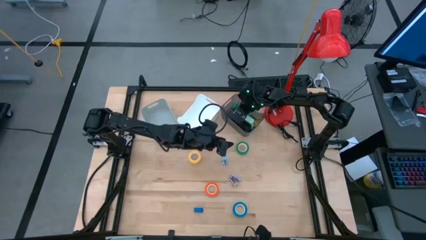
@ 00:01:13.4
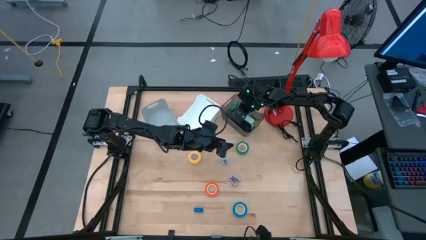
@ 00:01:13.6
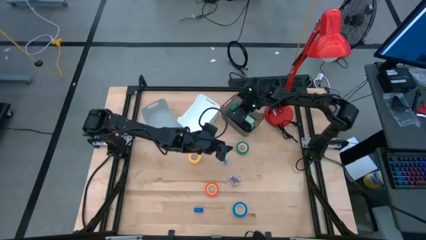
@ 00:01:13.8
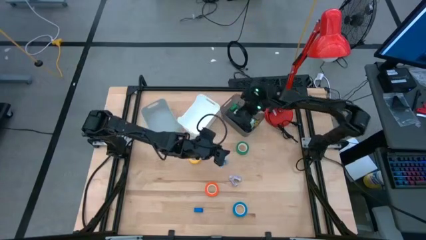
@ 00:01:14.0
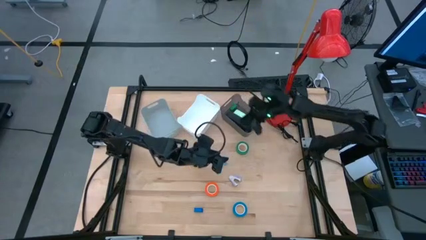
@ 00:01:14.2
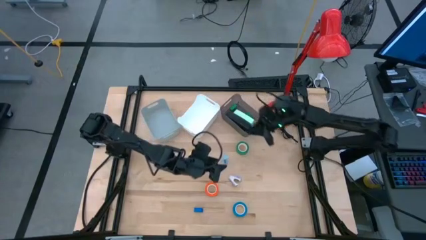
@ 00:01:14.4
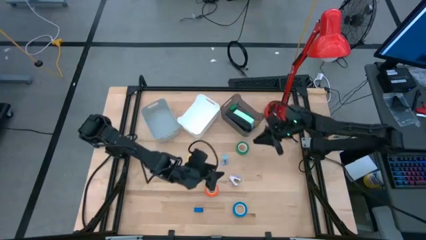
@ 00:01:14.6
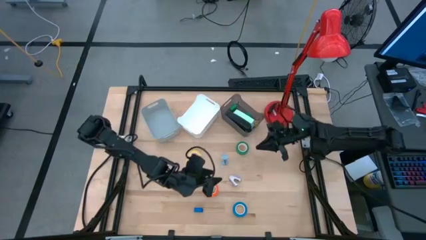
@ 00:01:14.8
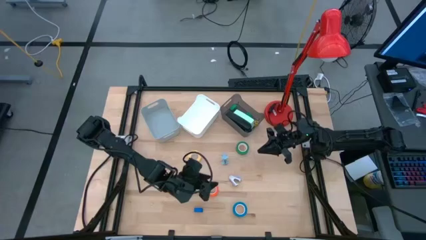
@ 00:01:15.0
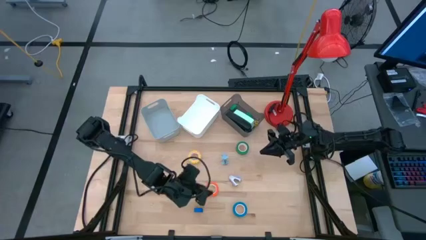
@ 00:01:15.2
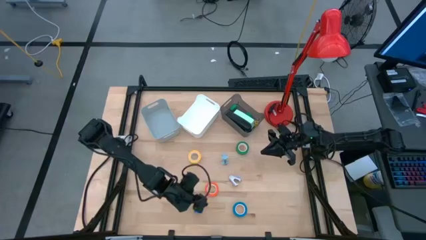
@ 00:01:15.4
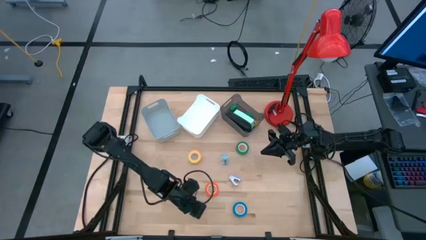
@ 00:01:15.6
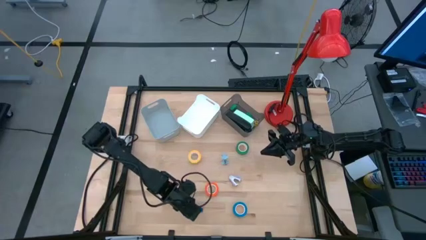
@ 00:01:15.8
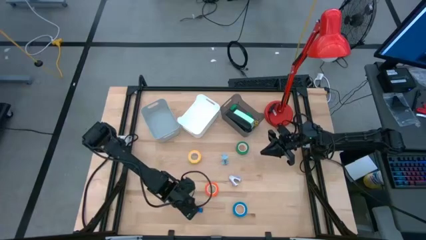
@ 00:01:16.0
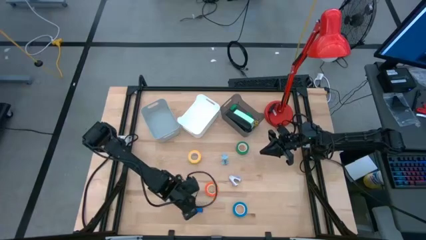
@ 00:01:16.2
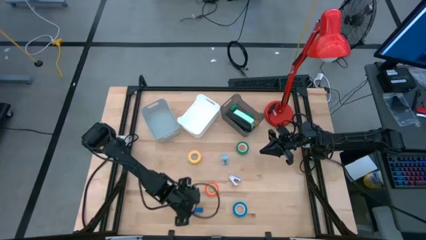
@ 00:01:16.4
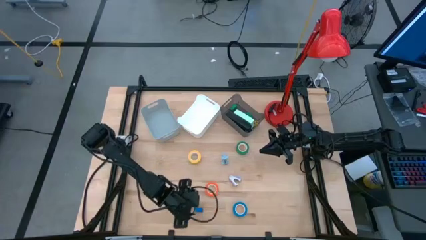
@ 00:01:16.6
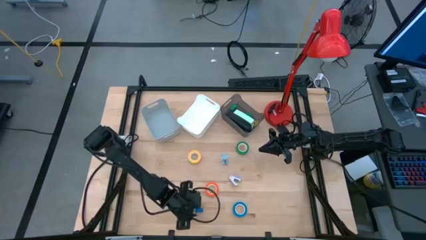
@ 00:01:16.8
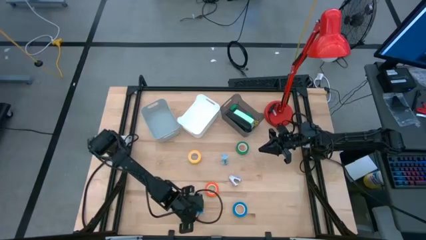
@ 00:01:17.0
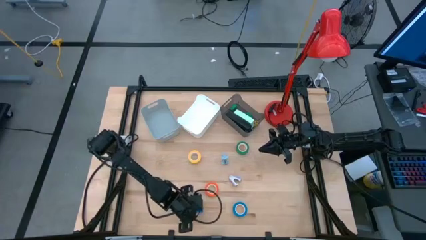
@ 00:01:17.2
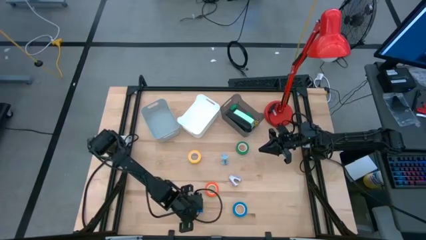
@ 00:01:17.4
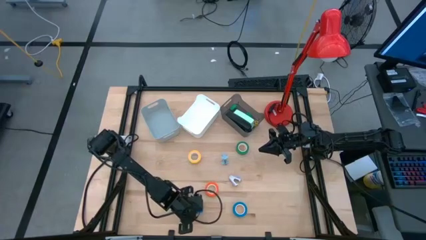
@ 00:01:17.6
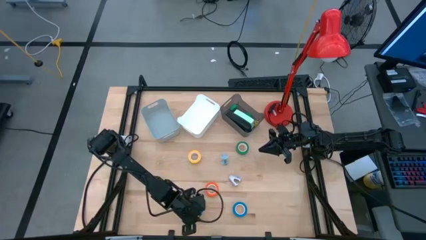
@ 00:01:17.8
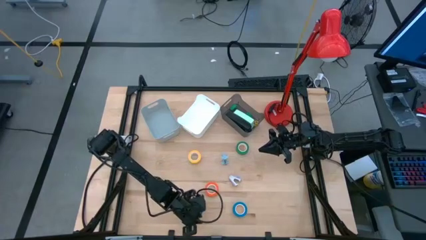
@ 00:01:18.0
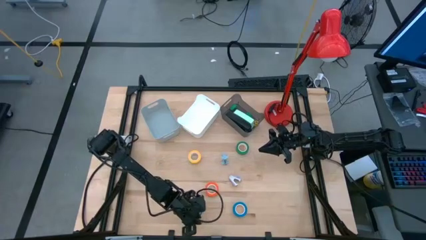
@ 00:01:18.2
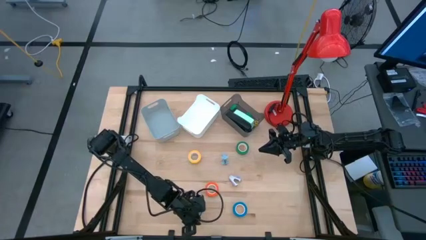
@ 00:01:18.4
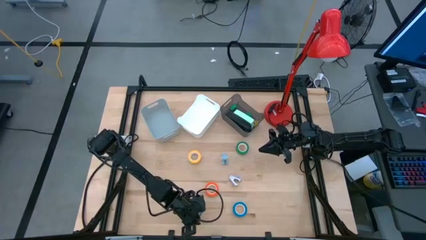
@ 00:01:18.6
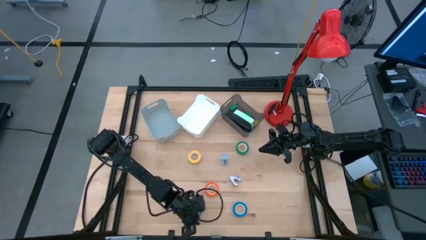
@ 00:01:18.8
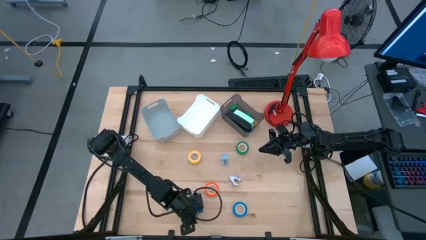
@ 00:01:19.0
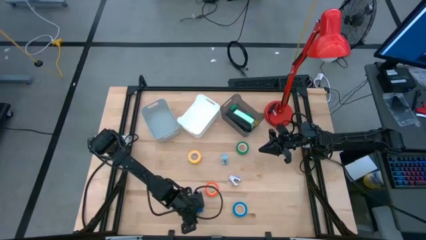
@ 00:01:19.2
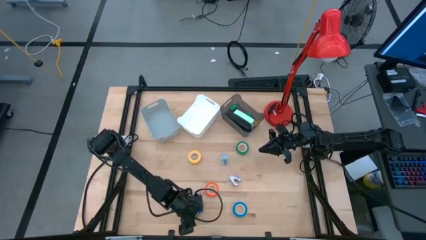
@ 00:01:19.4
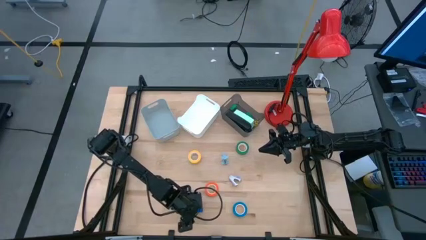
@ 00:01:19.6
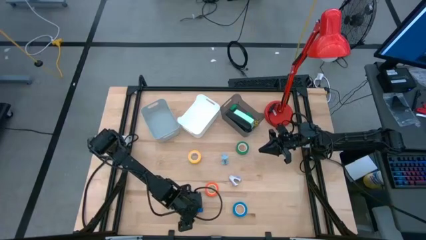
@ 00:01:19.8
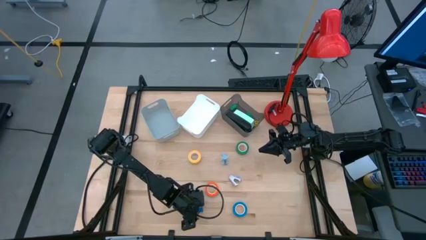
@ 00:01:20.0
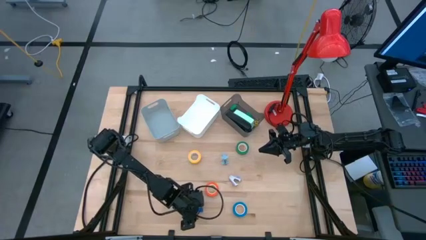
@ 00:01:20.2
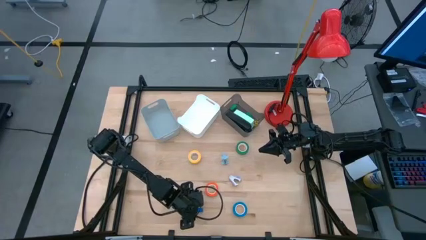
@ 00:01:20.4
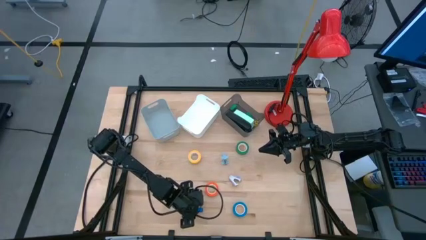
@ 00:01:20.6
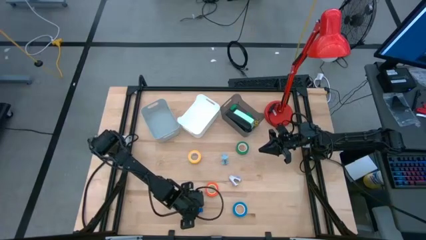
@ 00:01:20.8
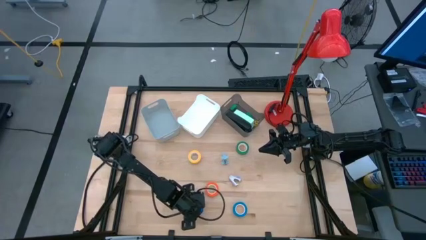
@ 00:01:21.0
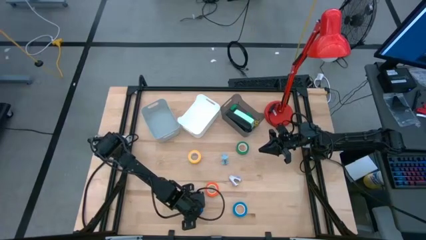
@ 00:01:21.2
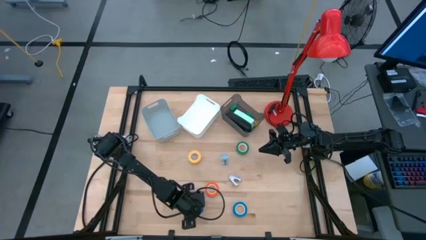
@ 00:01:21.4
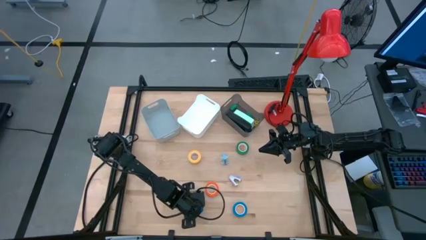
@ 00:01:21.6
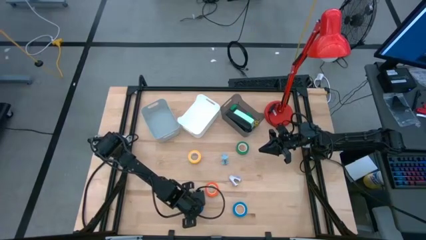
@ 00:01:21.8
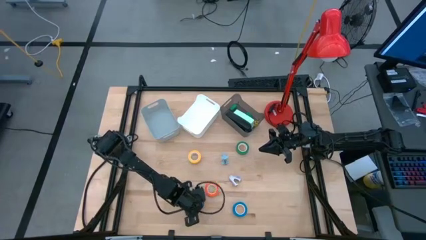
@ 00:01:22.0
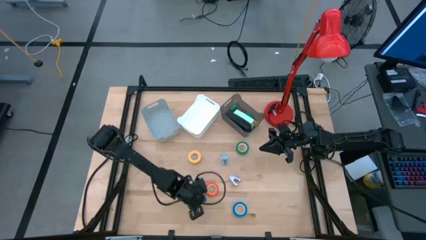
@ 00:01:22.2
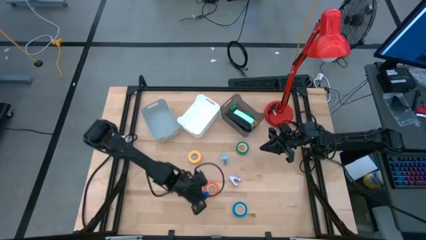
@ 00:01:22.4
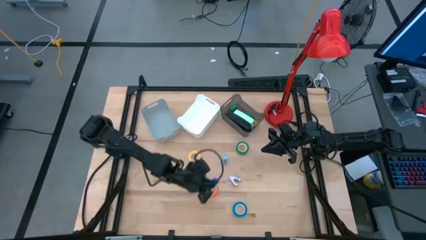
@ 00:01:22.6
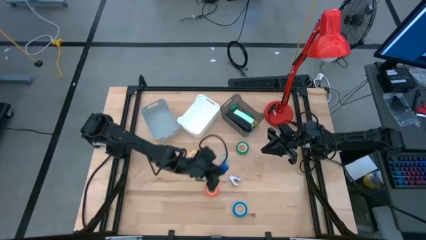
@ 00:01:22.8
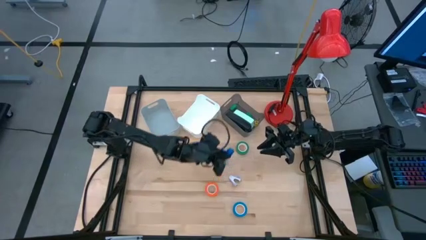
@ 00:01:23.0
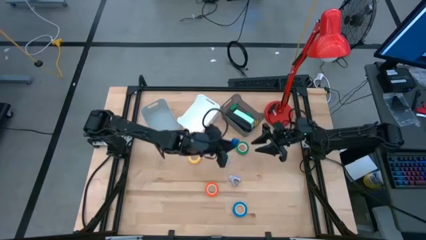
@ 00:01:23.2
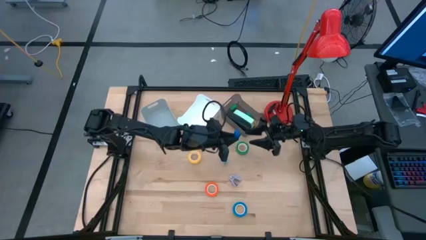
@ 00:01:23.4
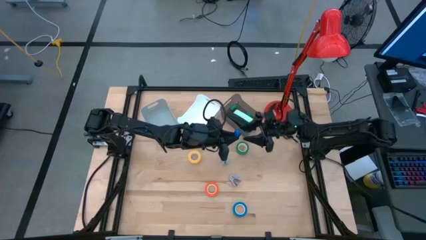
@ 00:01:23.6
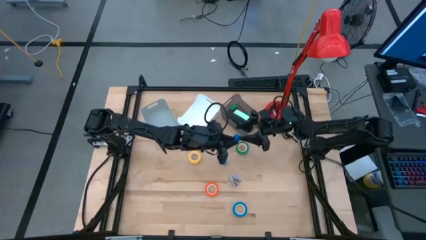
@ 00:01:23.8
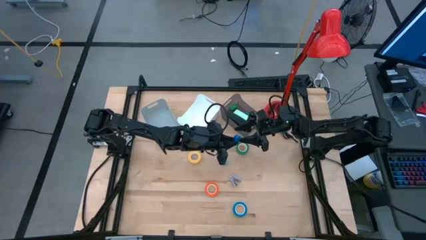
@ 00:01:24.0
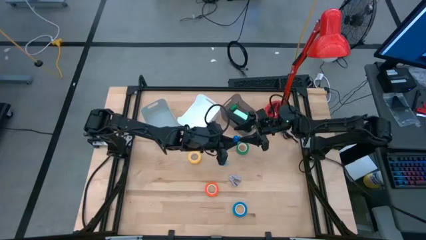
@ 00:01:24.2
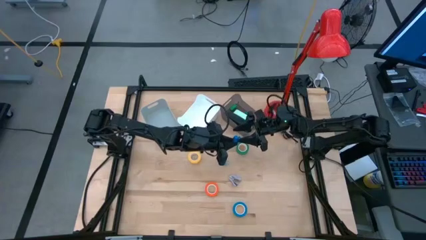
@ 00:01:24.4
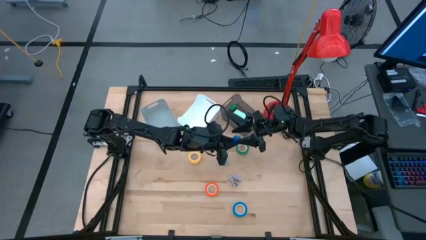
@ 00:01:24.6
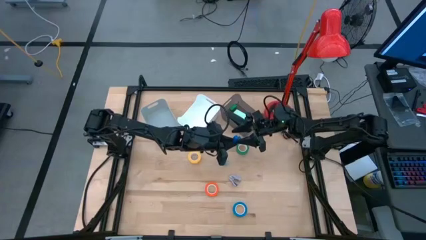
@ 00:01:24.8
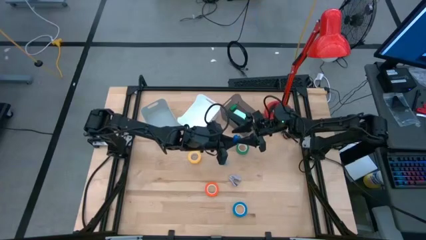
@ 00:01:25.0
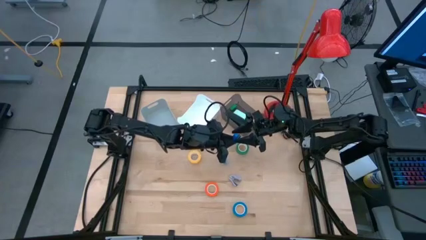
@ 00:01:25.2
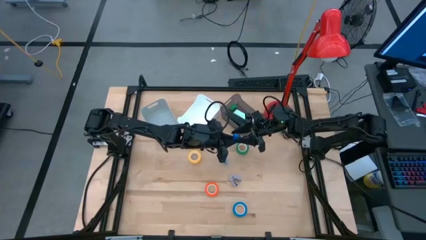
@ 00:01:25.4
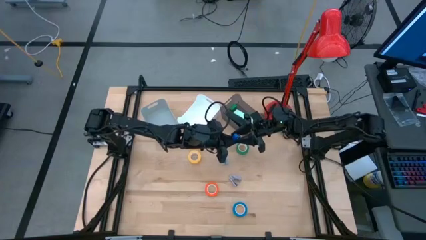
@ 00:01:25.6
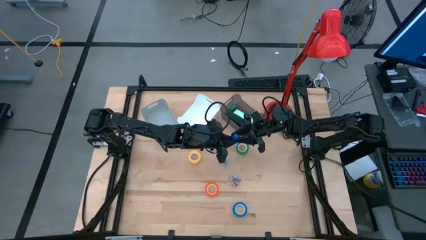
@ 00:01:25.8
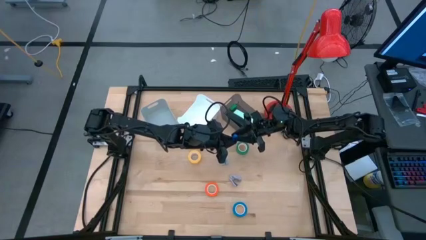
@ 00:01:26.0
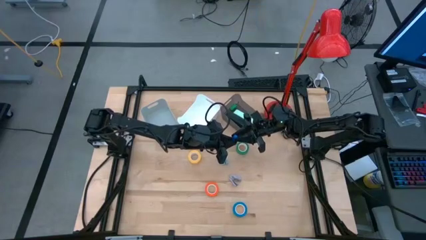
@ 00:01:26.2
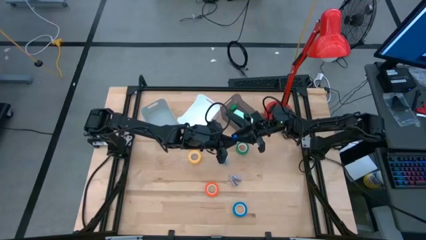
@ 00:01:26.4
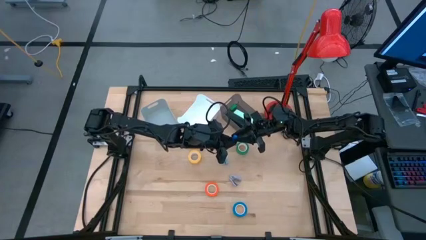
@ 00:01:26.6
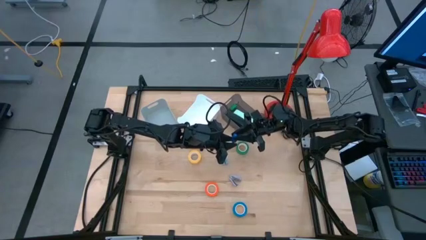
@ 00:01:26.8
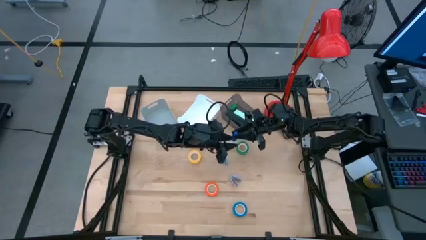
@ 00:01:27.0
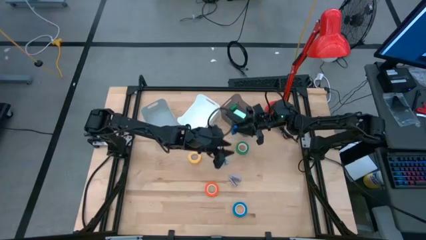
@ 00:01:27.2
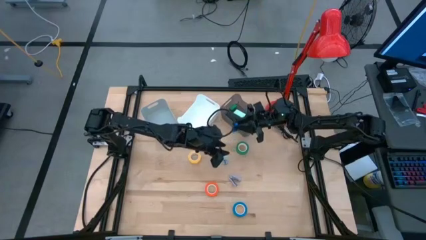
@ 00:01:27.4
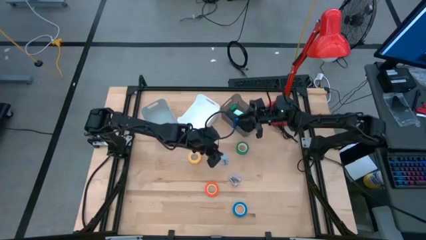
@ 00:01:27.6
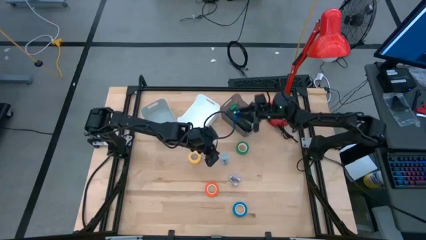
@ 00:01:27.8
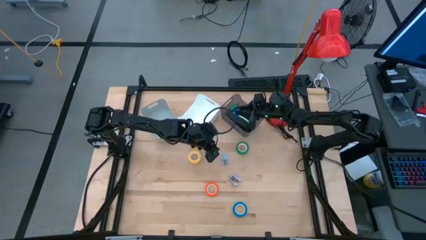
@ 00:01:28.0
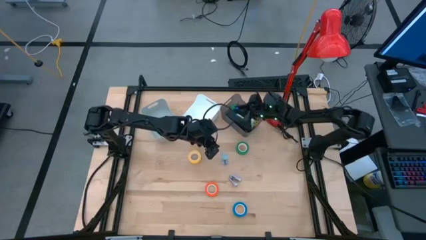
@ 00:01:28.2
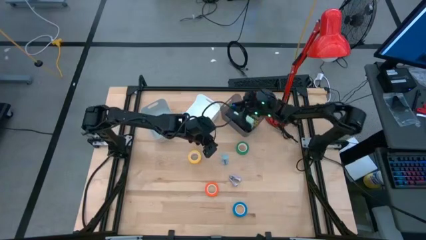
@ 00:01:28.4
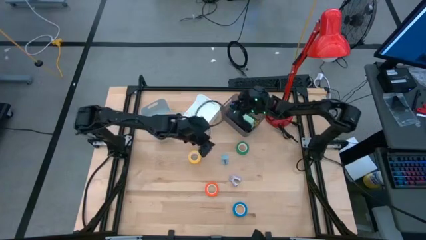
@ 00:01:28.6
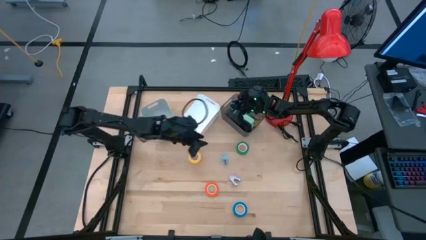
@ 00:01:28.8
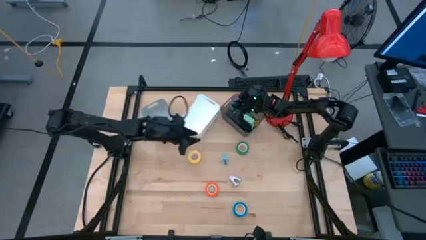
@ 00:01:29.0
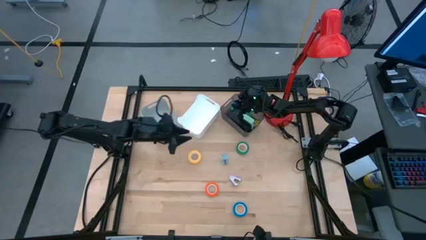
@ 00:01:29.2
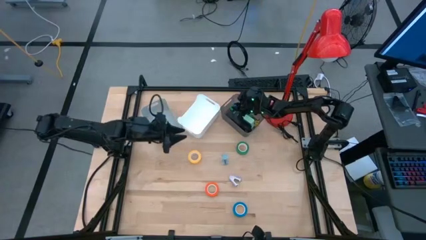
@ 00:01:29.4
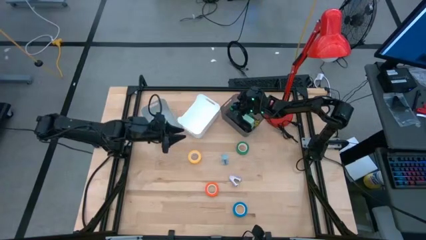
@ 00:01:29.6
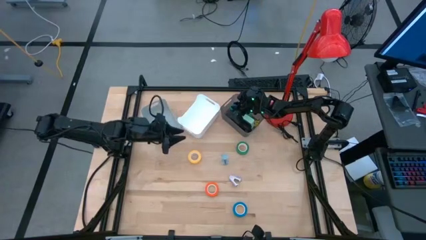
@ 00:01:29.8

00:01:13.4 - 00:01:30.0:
Task: Pick and place Stapler, Stapler remover, tape
Put the small blue stapler into the black bin
